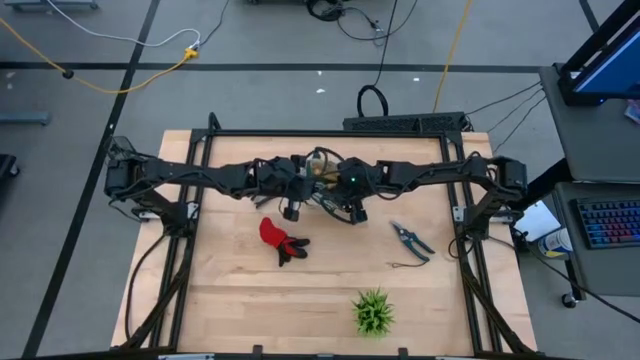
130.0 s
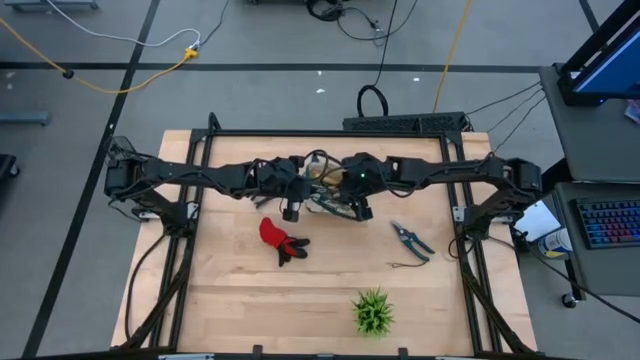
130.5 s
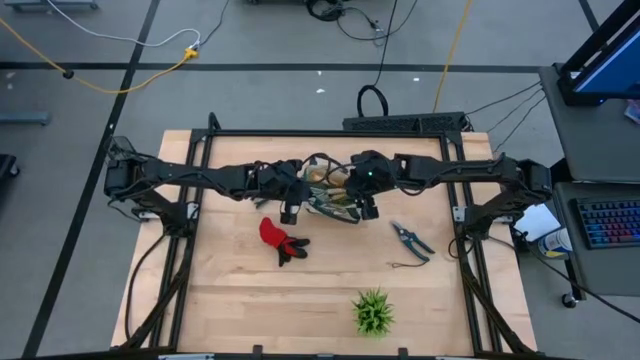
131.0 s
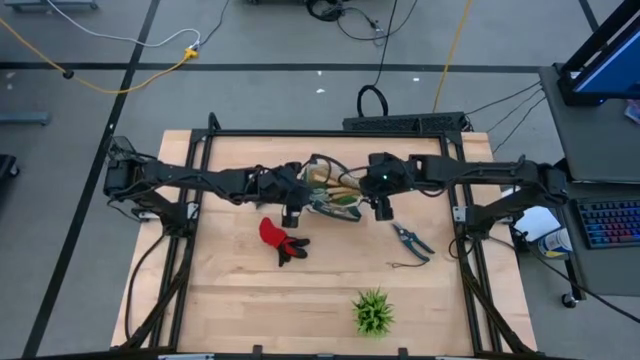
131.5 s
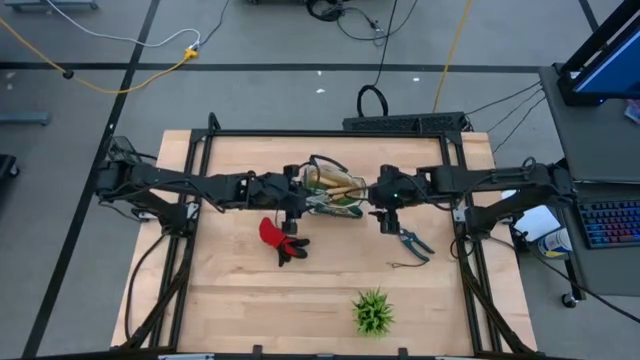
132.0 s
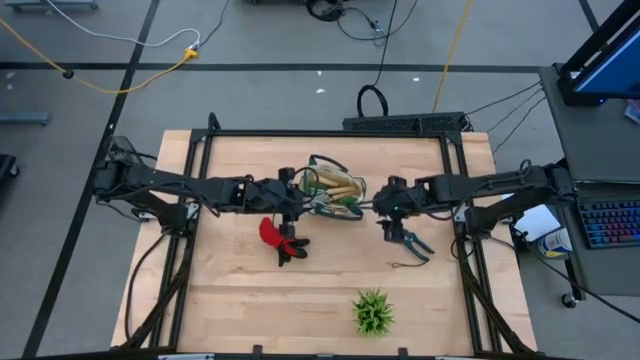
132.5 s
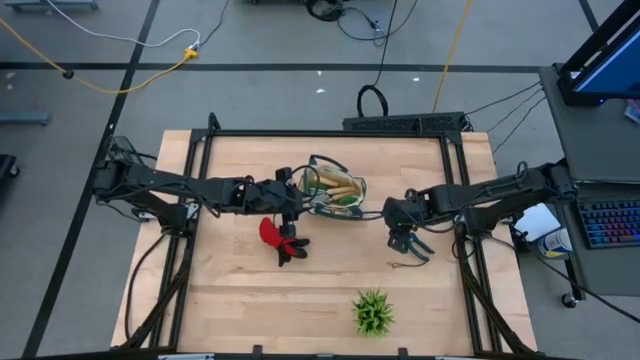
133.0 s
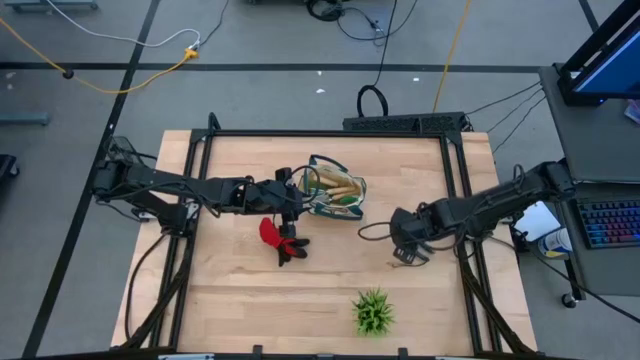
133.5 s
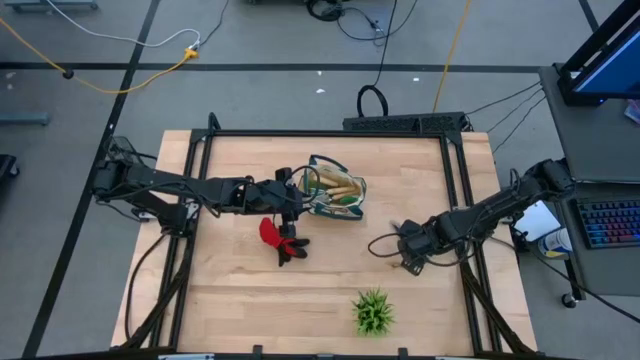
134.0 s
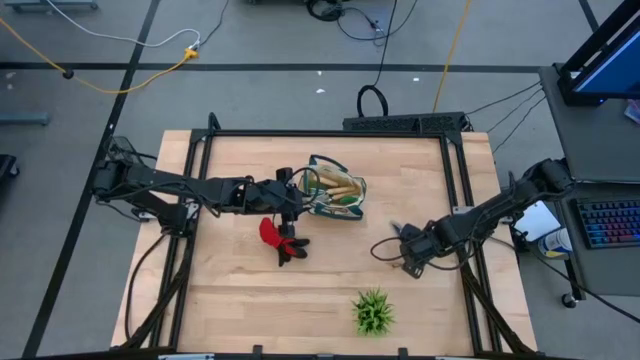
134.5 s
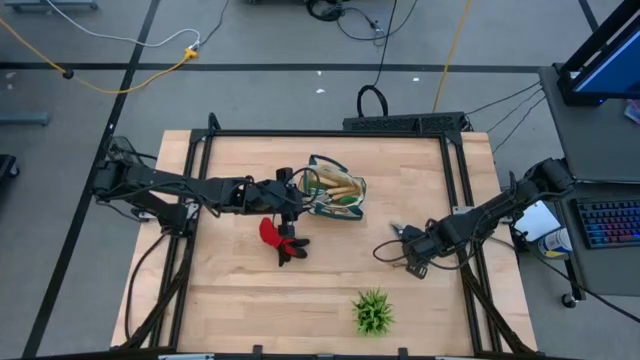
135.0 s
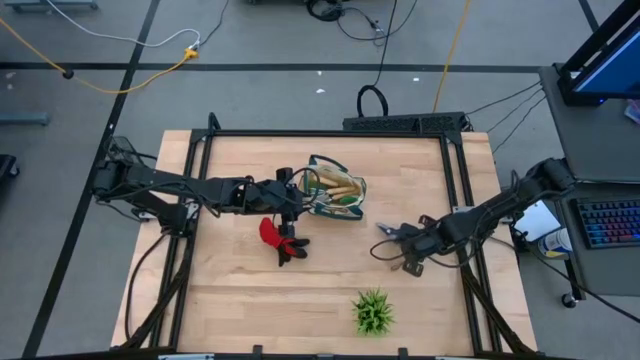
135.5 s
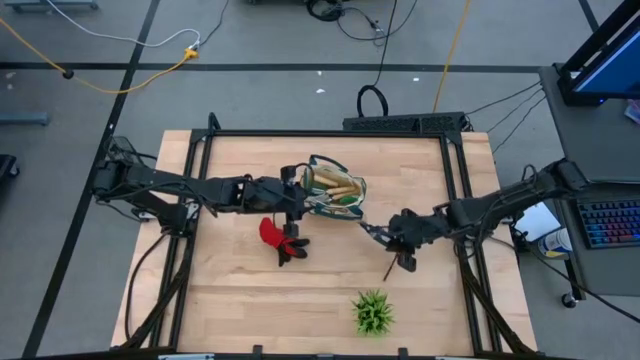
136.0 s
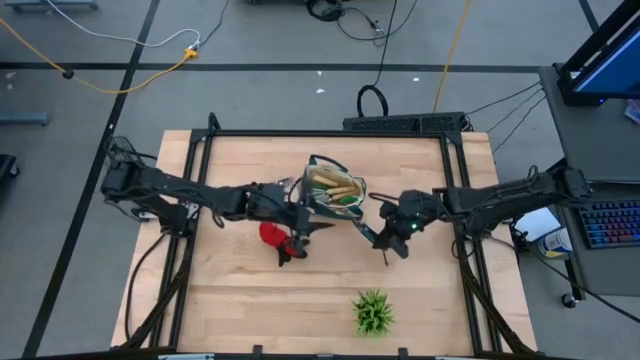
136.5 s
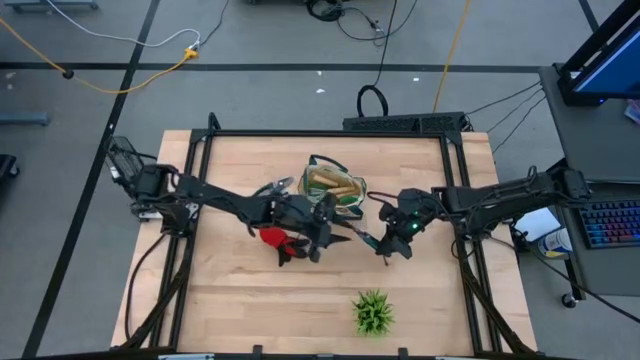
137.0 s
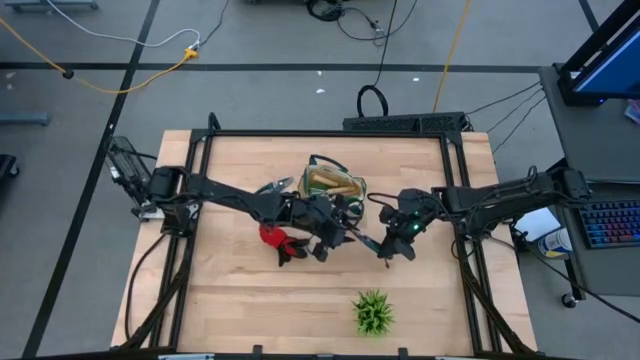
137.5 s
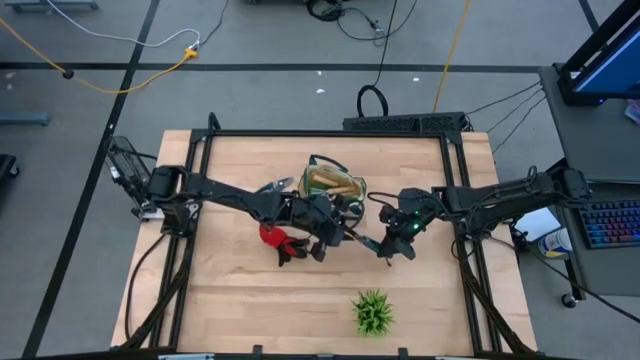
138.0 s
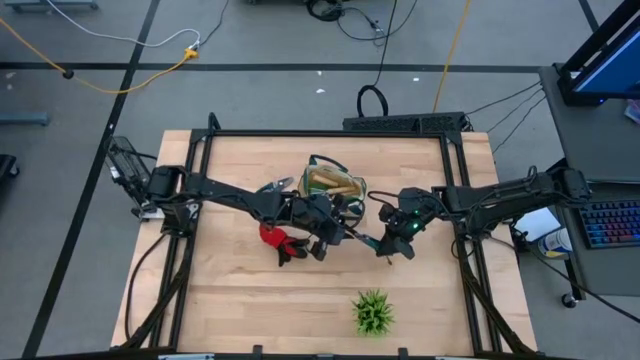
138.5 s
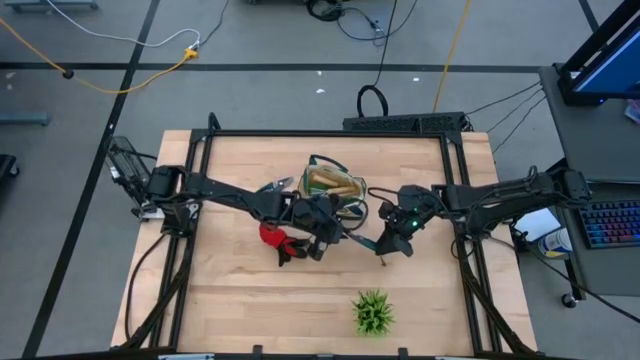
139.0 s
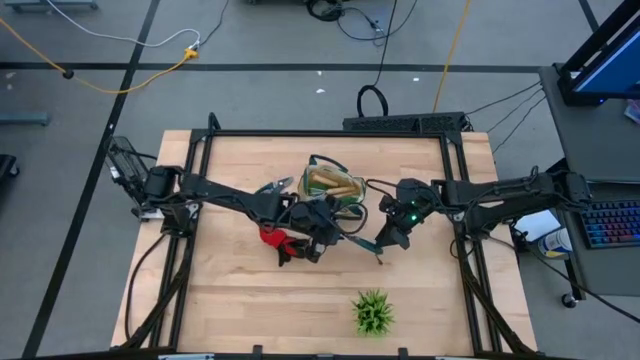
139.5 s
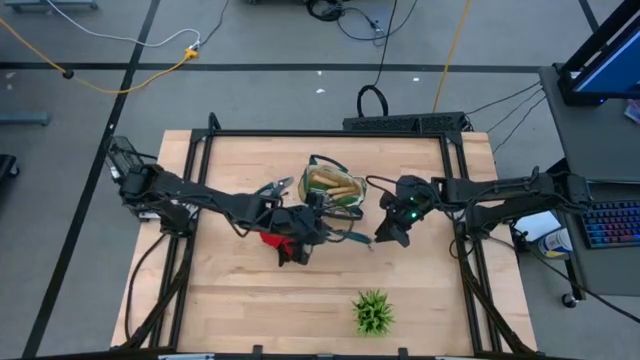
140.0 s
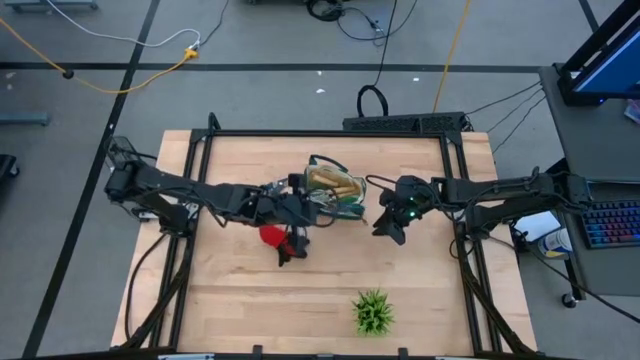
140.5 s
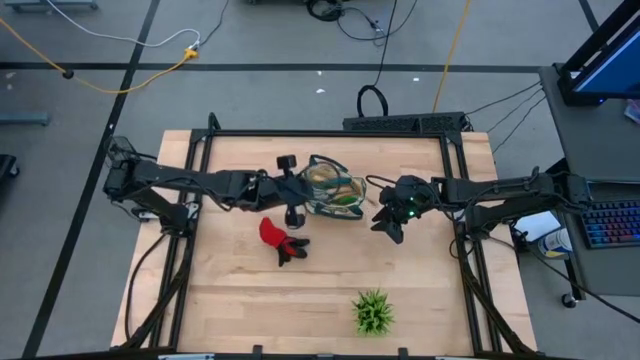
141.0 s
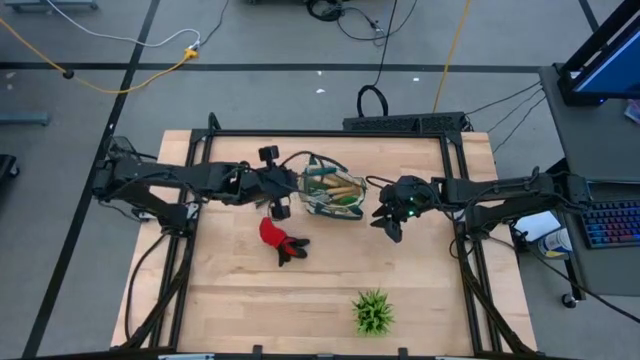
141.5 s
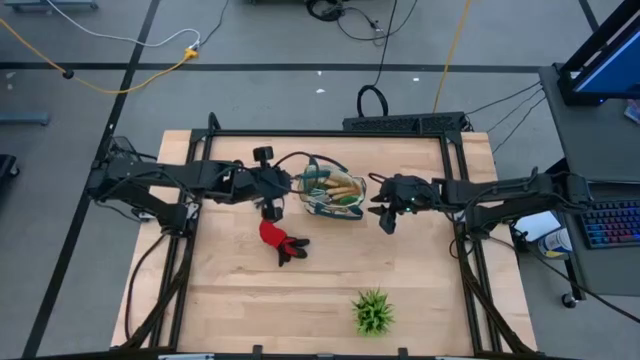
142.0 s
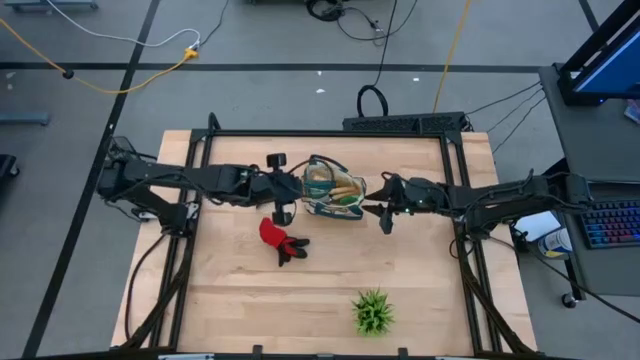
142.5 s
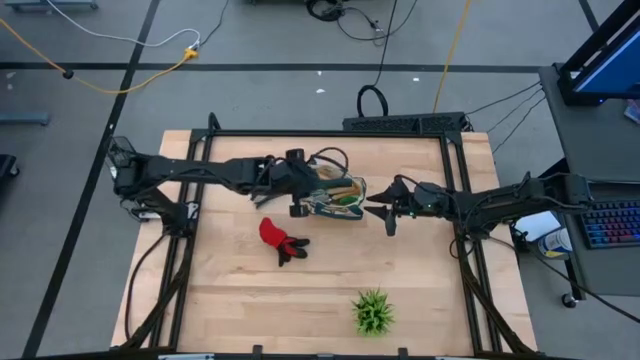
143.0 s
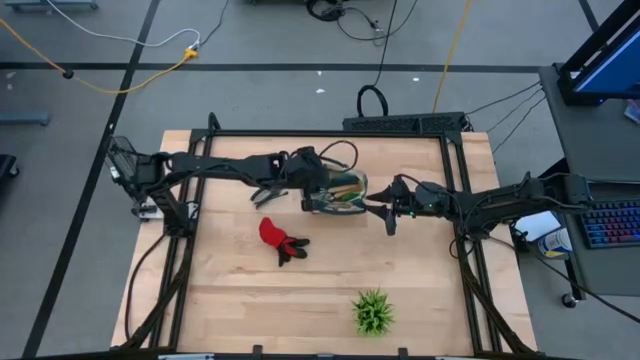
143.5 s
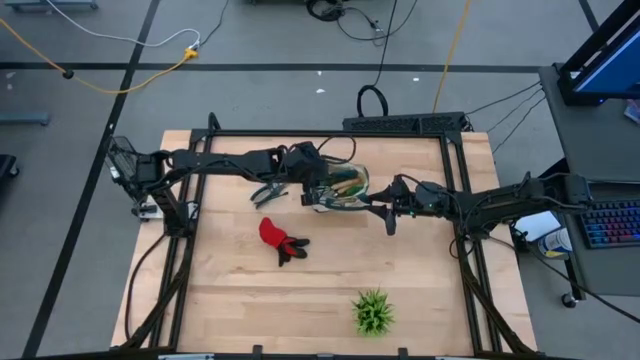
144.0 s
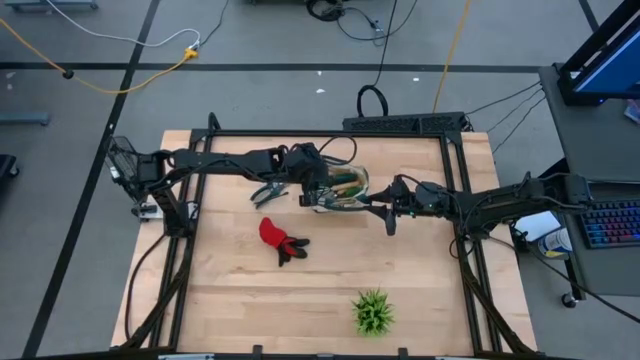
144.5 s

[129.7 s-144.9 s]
Task: Pick & Place Garden tools in Gardening bag
Put the right blue fruit pruner into the gardening bag

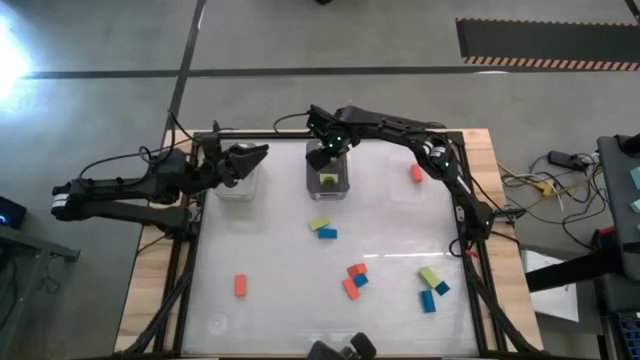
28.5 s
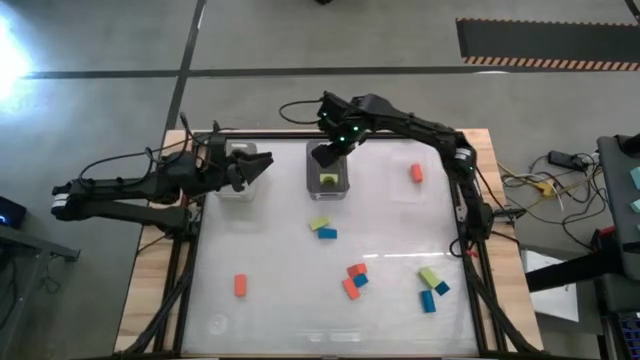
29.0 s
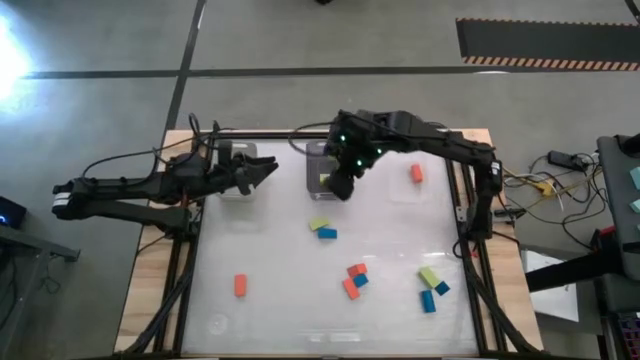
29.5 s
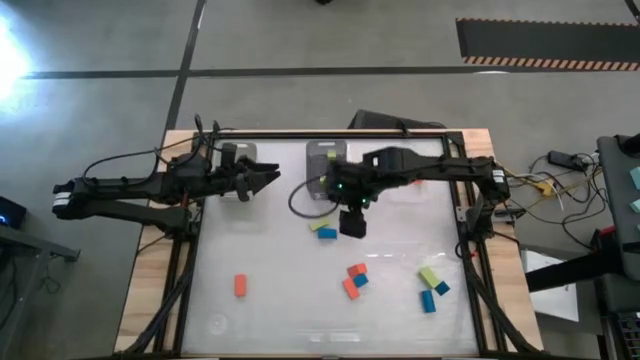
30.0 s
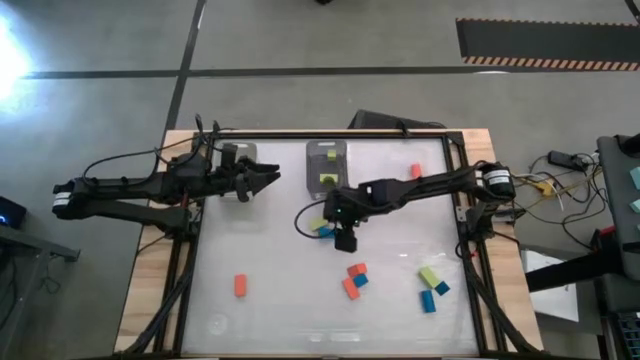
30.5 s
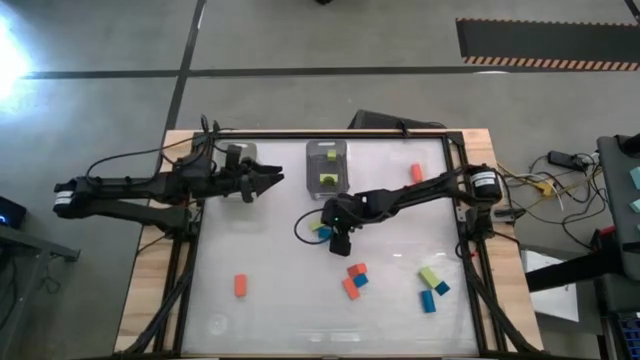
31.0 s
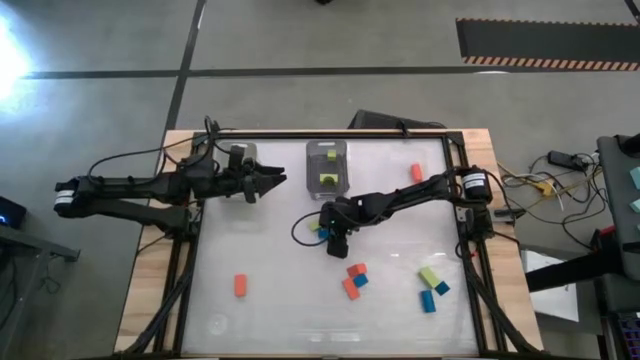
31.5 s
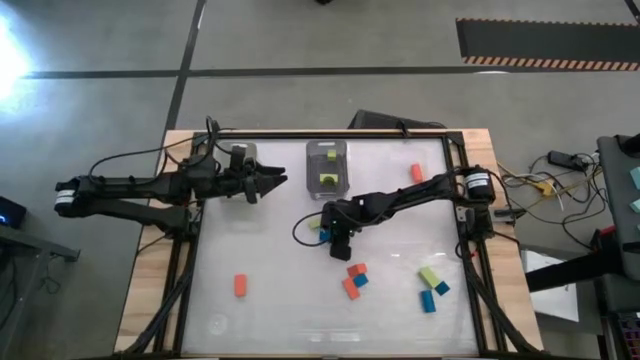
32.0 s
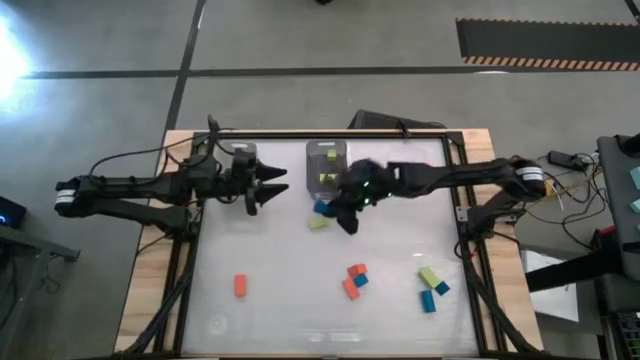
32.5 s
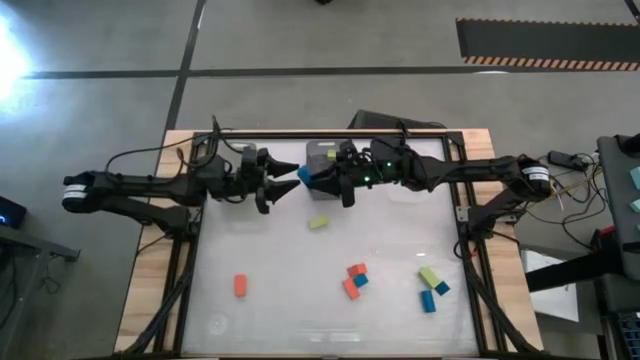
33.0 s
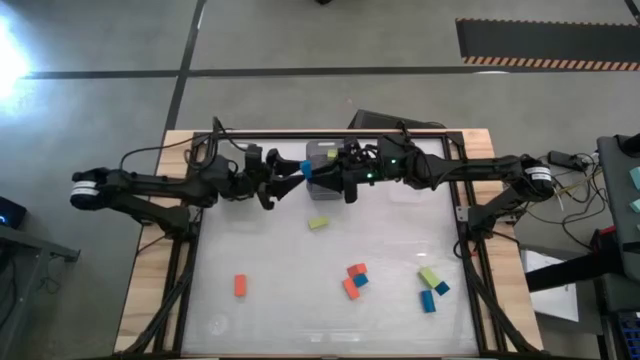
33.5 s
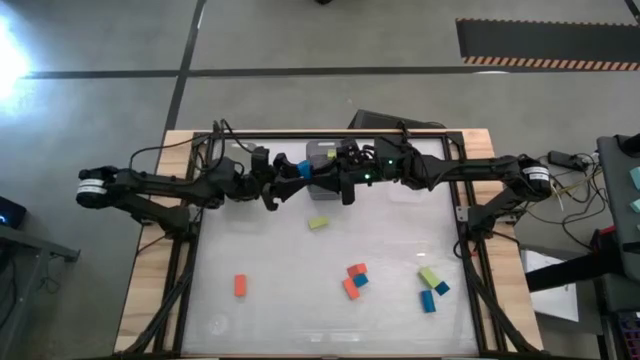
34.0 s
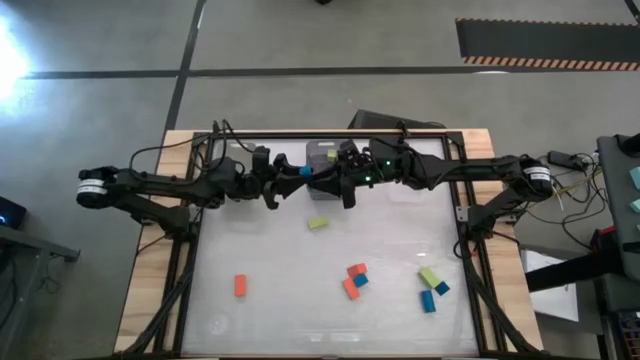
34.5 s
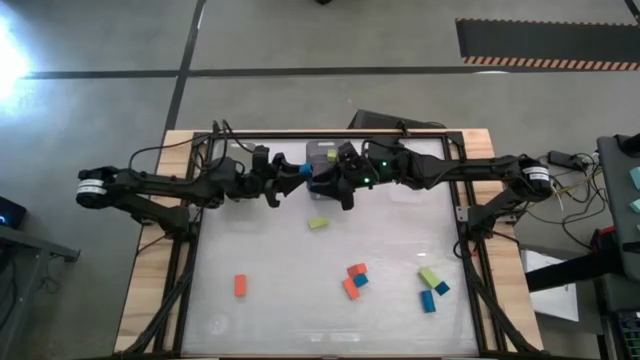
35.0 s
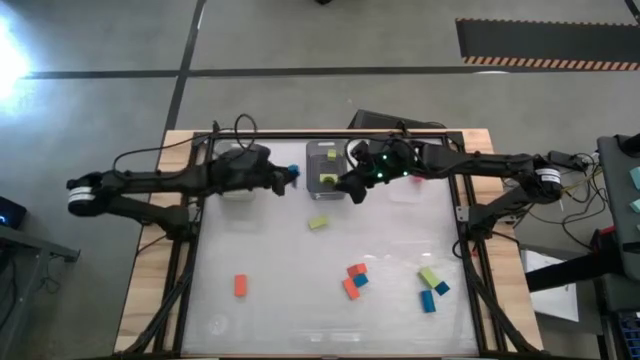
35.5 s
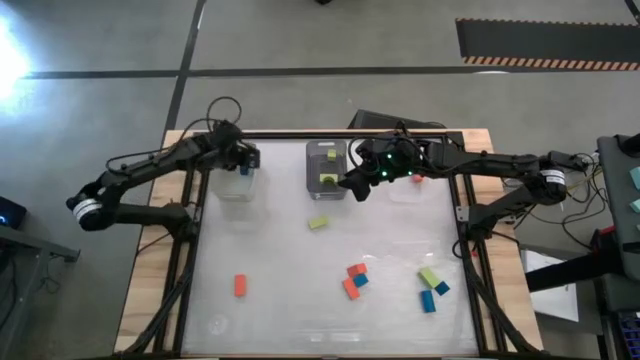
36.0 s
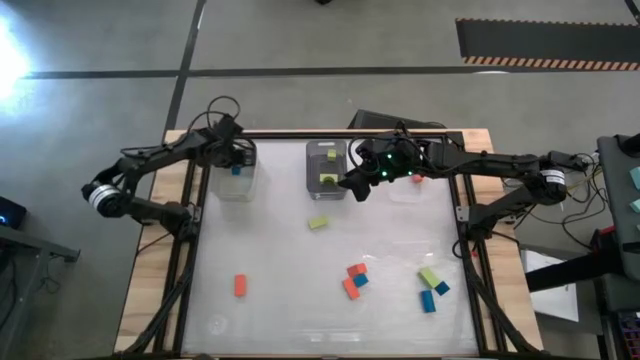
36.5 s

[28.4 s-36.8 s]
Task: Sort & place blocks by color
Put the left blue block into the white bin
